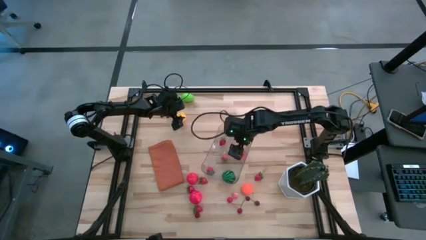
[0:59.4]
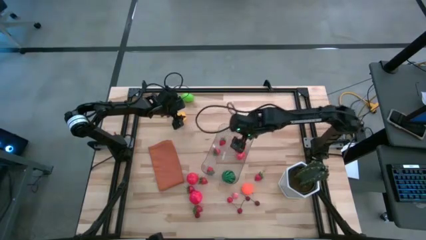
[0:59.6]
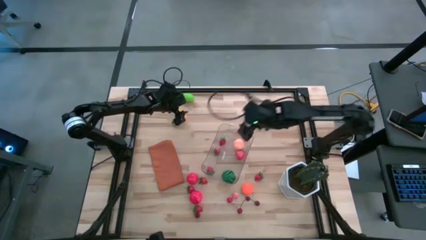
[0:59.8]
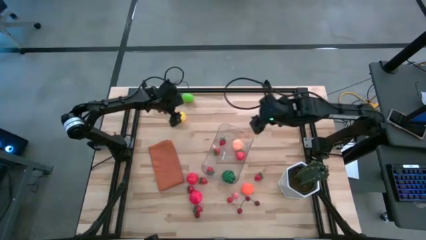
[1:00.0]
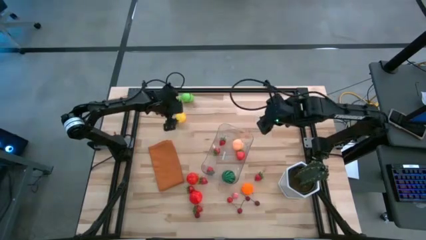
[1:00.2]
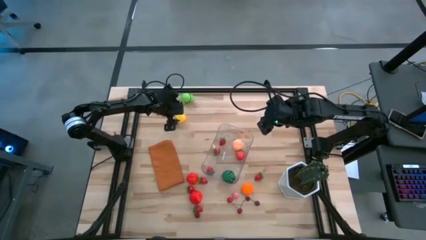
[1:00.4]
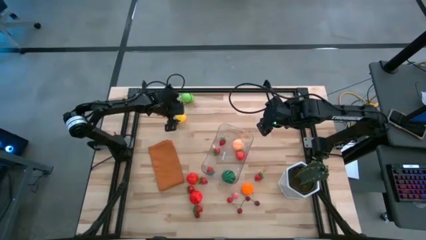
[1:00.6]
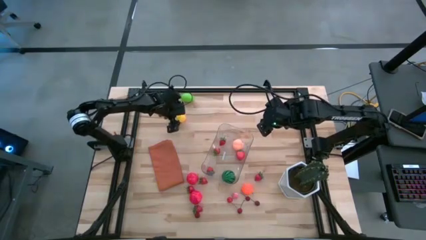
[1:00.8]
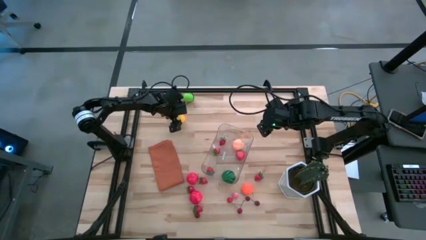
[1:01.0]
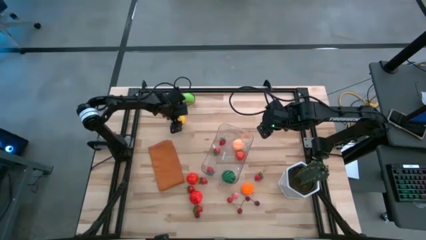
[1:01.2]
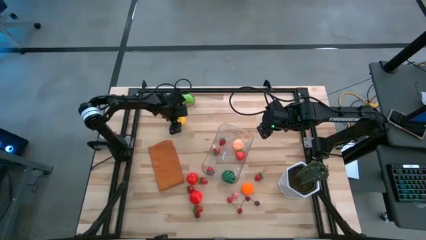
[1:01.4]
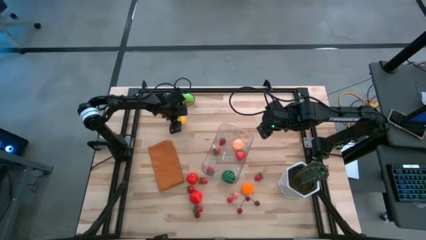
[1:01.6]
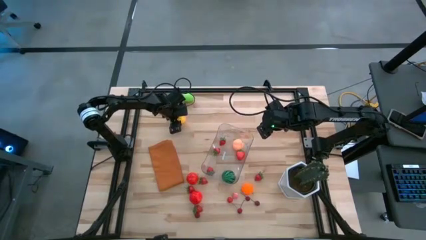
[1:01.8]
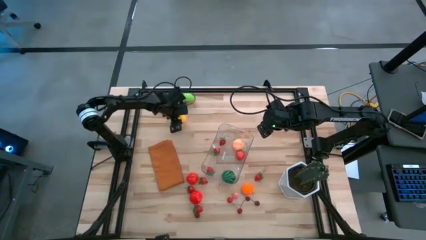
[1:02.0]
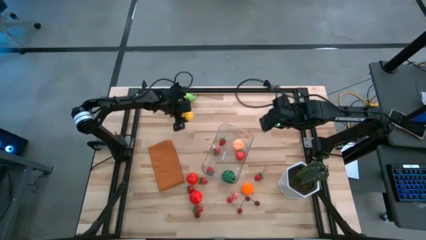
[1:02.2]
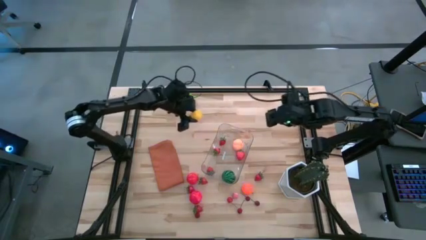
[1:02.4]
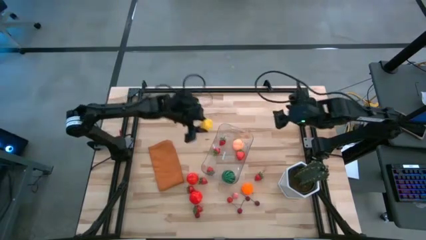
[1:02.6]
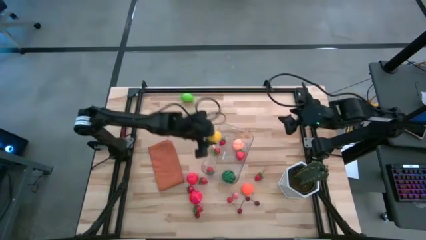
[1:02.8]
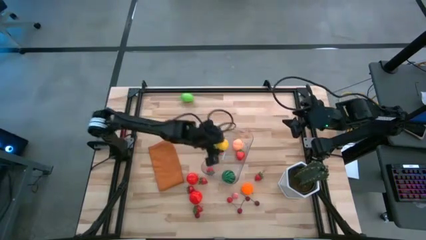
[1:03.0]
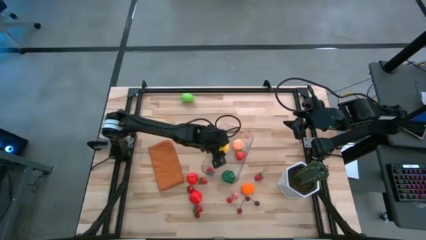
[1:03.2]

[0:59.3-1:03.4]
Task: Pick and placing Produce into tupperware
Put the yellow pineapple into the transparent bin

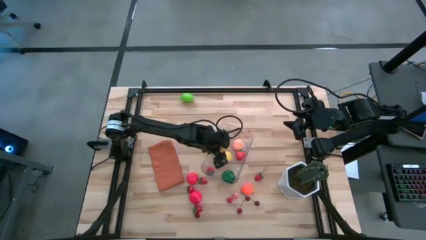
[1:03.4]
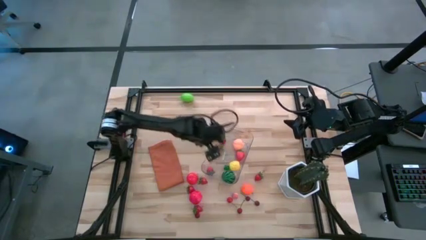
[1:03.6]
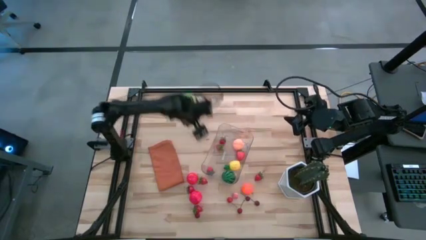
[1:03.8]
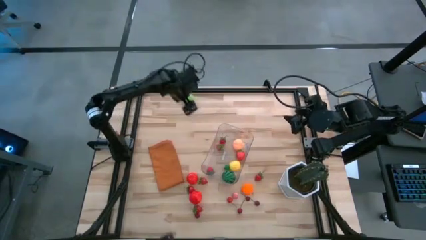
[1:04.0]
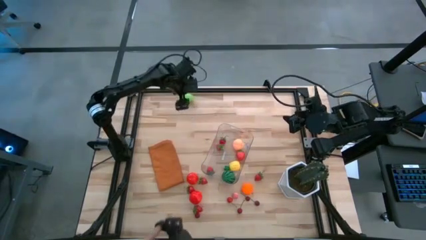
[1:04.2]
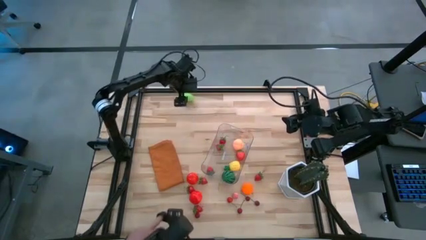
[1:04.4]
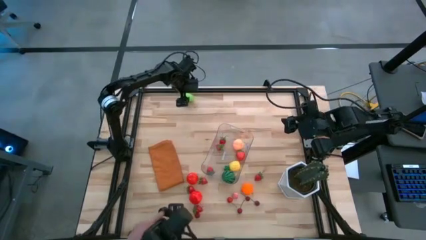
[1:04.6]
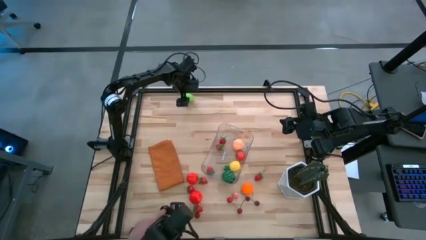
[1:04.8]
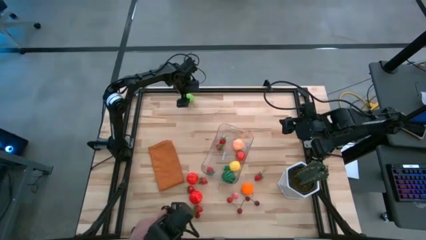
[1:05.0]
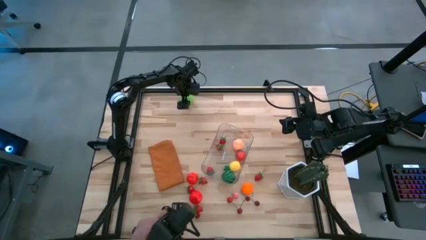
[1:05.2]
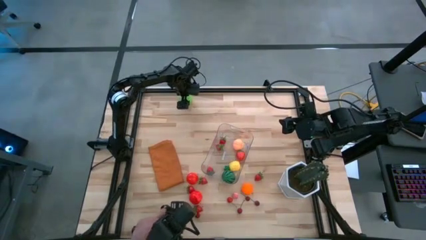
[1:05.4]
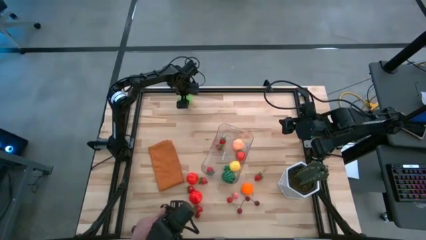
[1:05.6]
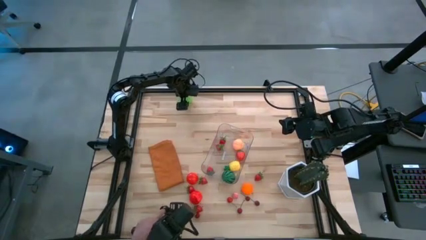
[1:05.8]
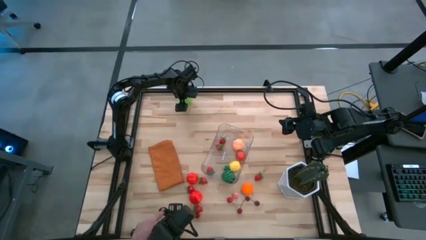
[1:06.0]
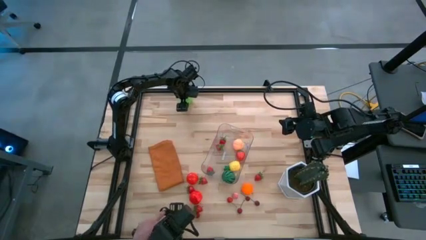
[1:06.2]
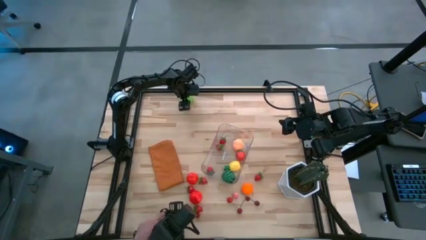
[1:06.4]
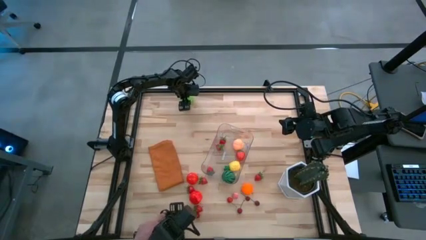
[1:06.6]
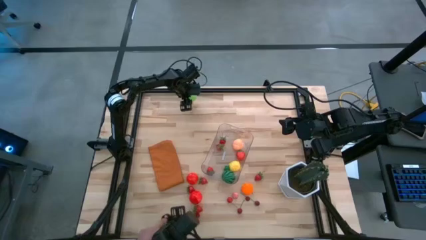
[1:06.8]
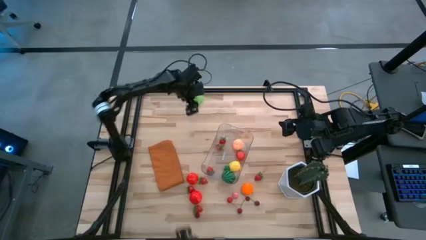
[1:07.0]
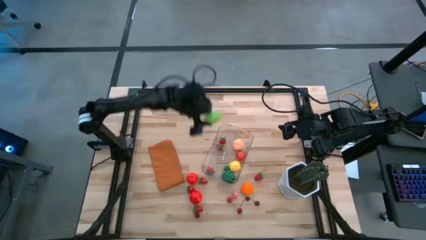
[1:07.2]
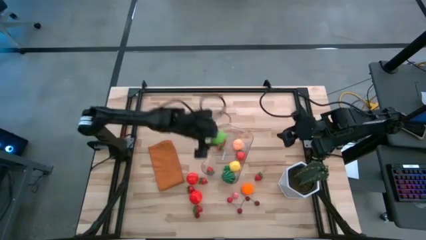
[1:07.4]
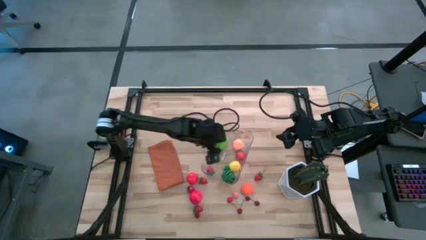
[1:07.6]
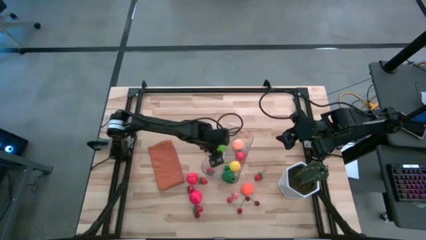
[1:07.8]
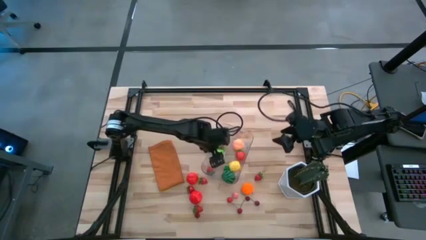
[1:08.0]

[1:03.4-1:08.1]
Put the green melon into the transparent bin

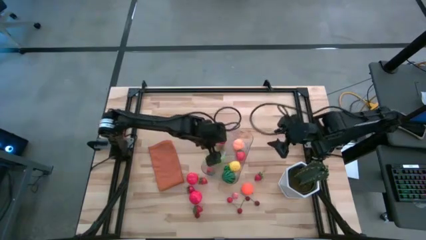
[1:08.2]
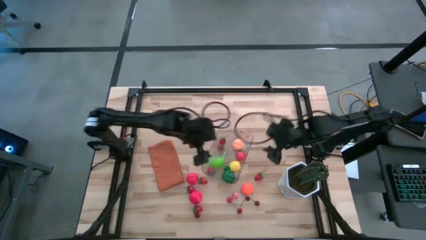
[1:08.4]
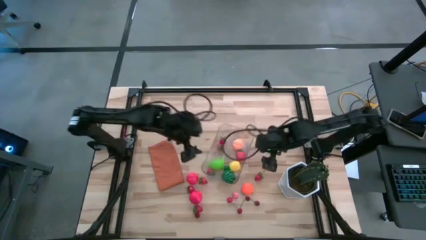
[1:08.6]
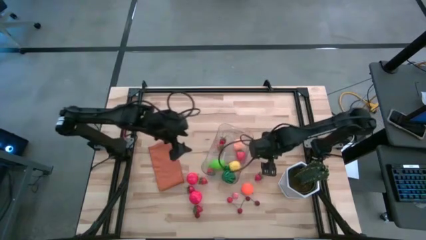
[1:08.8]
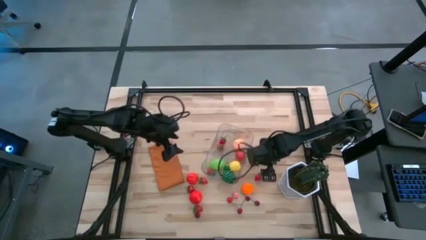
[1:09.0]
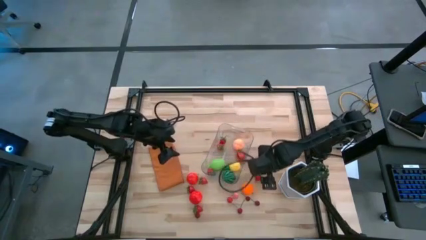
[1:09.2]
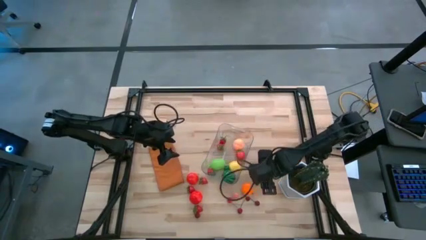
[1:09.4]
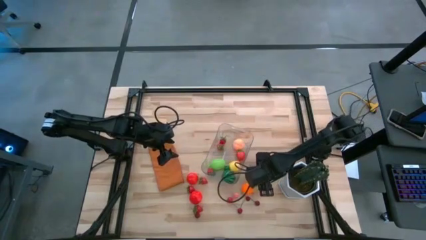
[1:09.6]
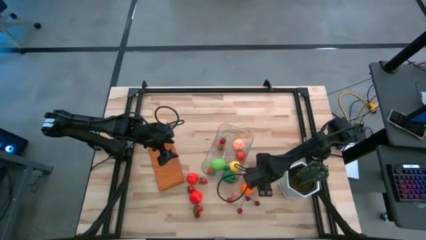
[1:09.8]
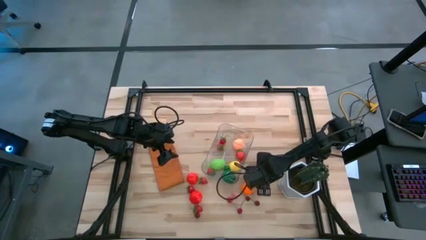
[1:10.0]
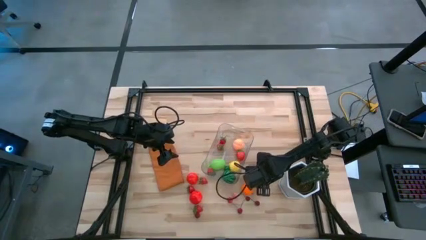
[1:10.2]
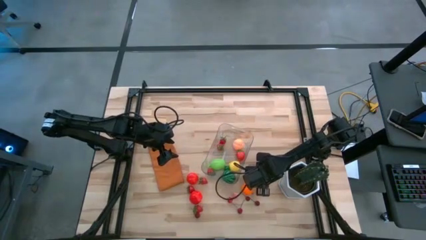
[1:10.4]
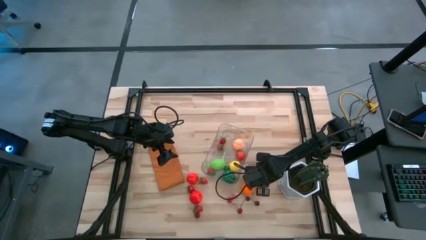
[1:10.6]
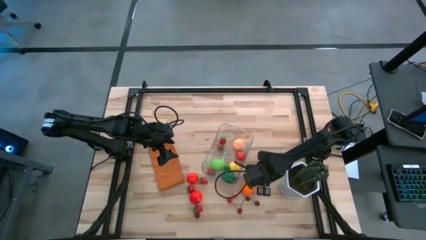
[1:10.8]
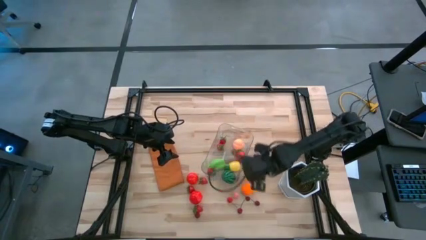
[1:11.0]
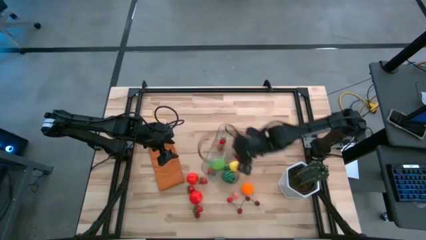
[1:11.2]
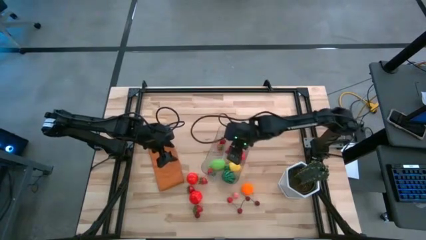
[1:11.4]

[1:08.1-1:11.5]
Put the red strawberry into the transparent bin

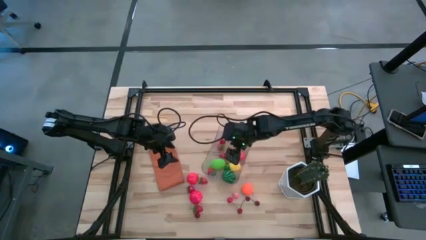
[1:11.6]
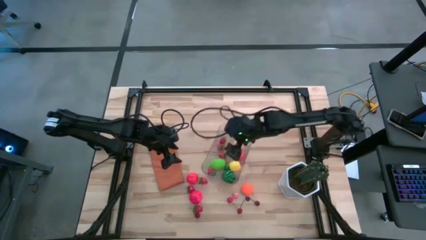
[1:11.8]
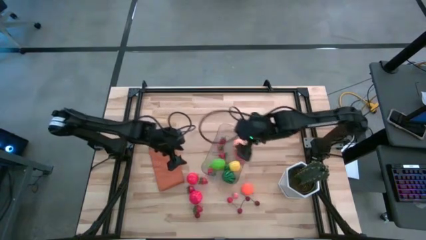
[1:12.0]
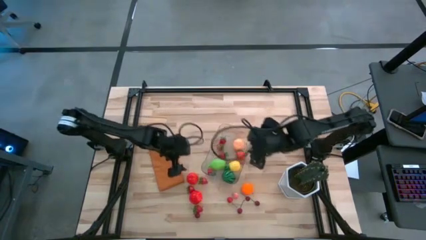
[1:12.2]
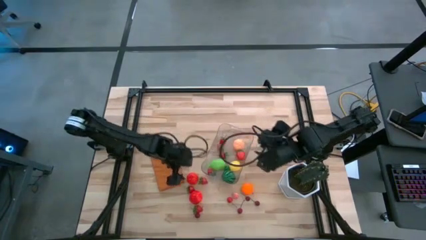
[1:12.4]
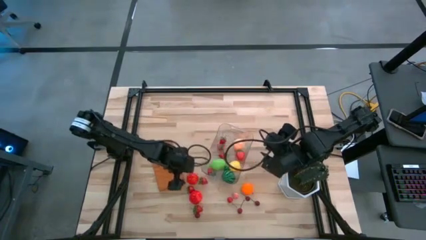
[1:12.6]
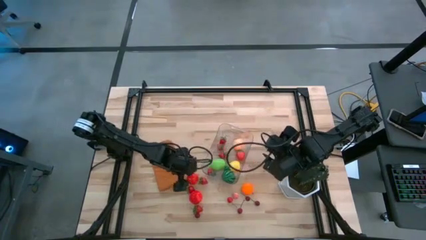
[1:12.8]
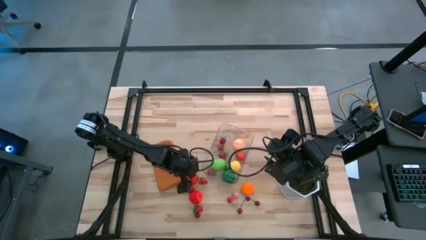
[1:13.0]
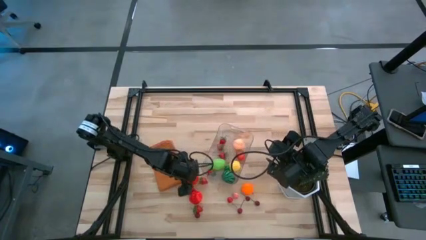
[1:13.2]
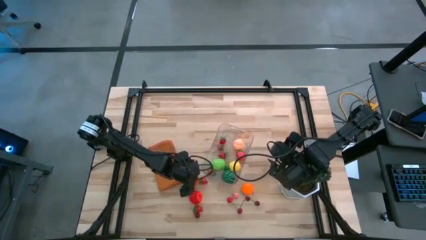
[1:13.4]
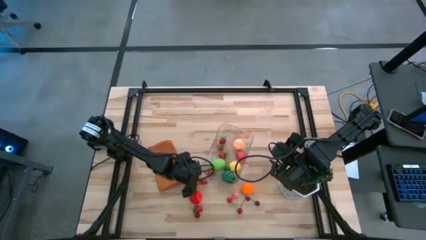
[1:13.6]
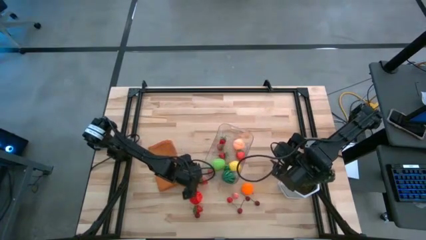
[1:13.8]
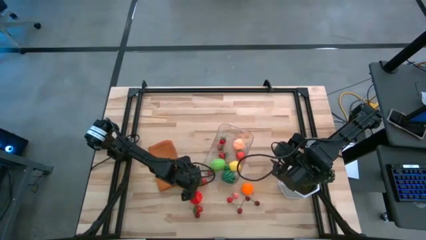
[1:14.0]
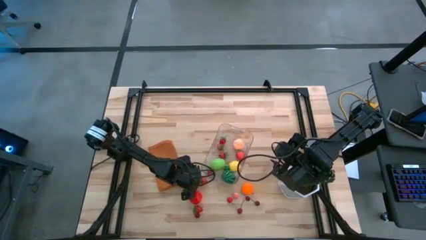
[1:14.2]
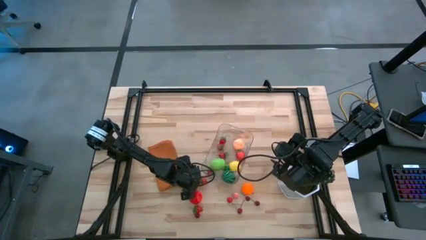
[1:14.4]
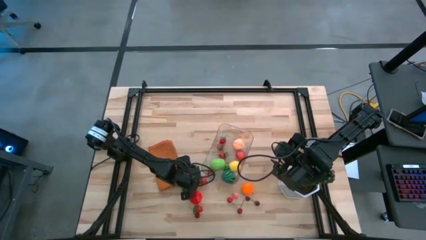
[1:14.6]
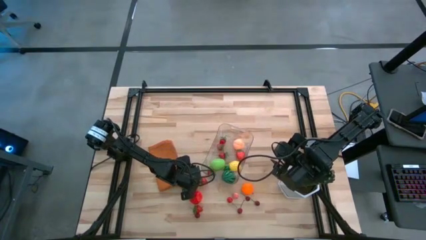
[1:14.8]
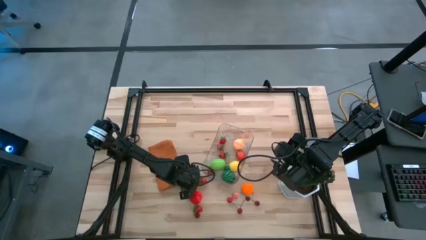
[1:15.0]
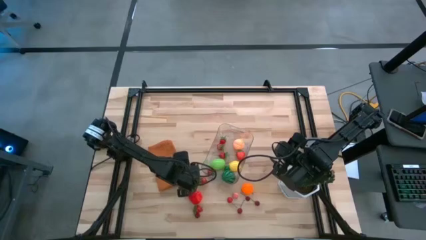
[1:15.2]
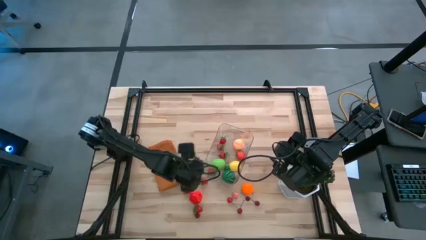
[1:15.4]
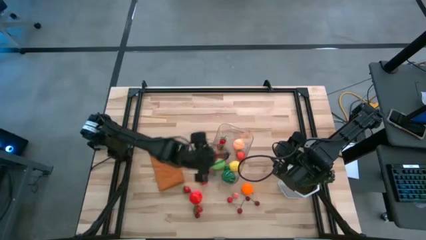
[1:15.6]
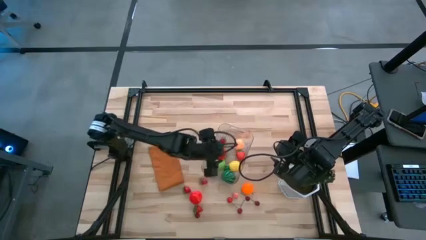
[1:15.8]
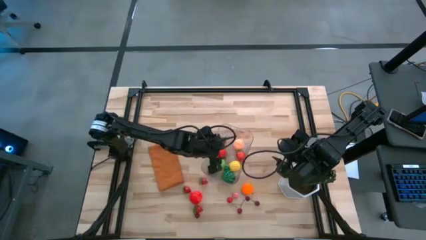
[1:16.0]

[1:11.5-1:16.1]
Put the red tomato into the transparent bin
